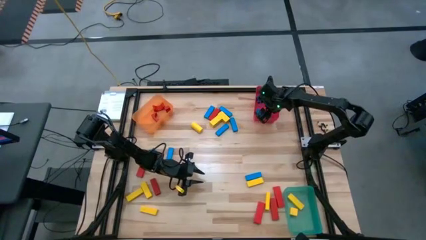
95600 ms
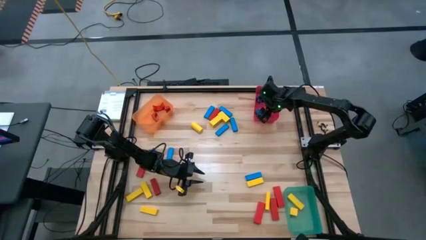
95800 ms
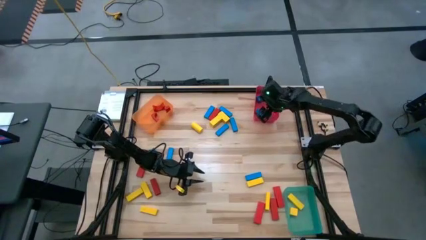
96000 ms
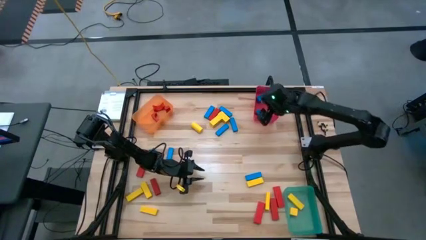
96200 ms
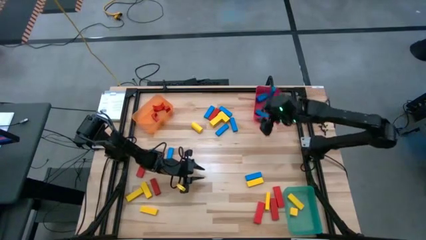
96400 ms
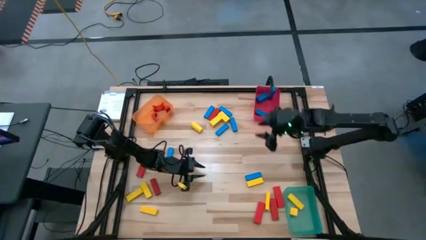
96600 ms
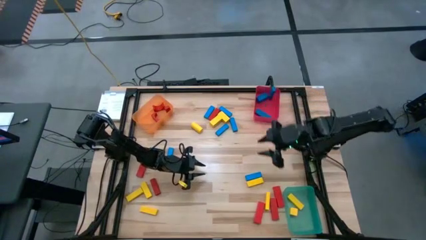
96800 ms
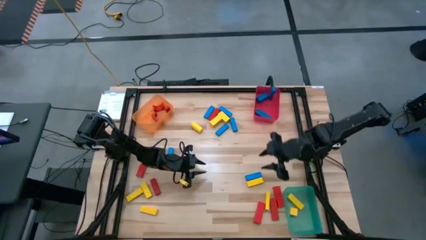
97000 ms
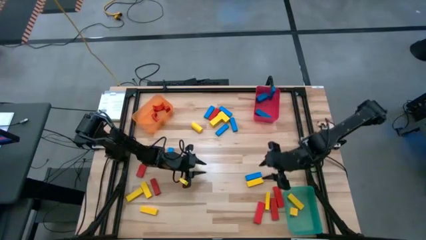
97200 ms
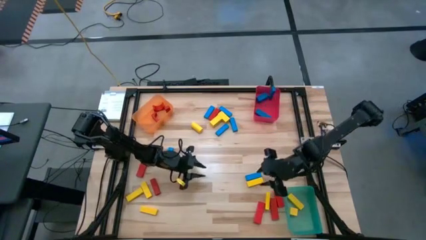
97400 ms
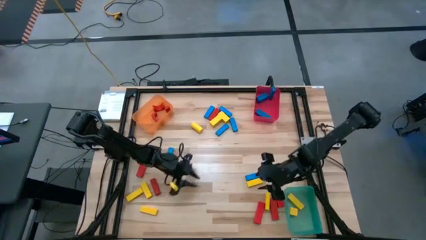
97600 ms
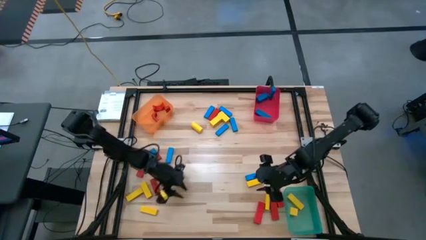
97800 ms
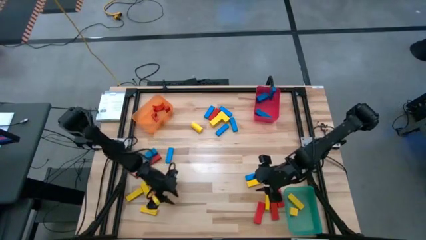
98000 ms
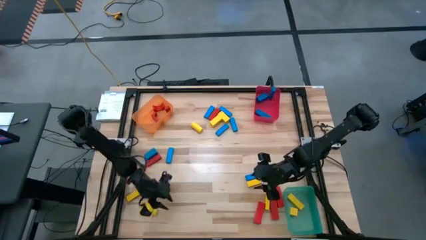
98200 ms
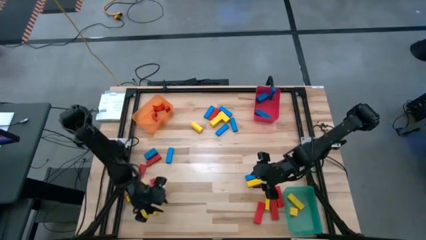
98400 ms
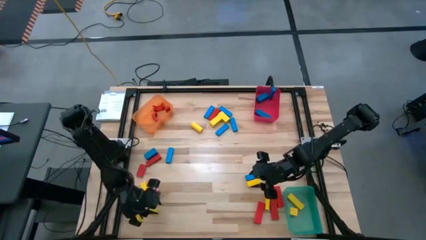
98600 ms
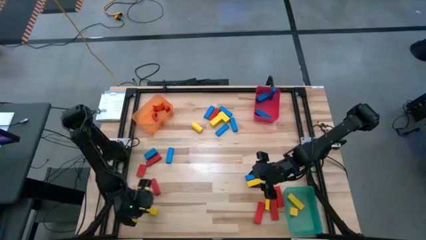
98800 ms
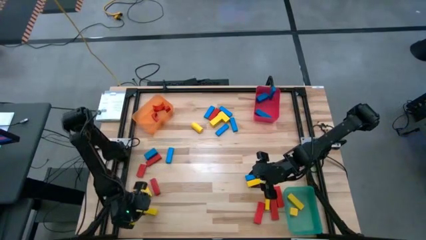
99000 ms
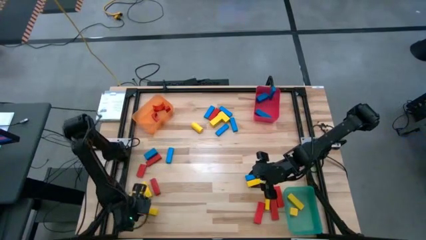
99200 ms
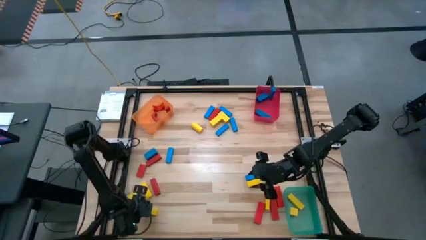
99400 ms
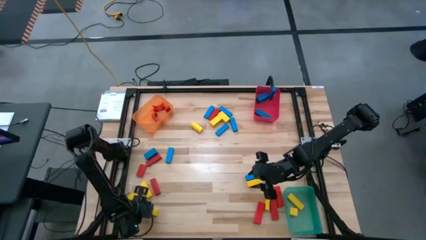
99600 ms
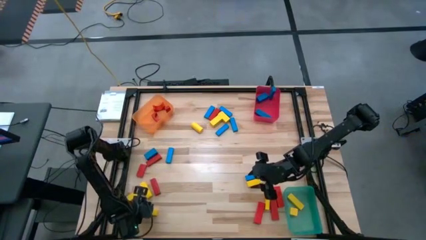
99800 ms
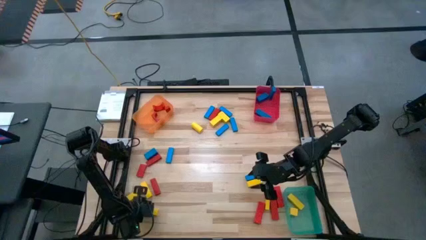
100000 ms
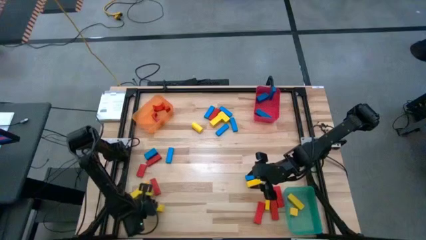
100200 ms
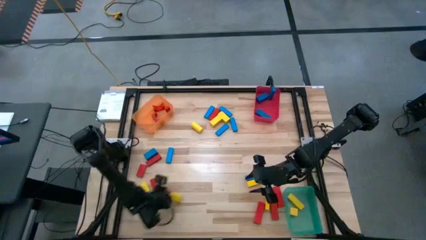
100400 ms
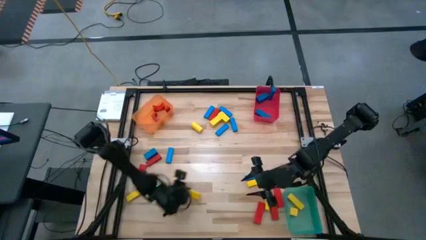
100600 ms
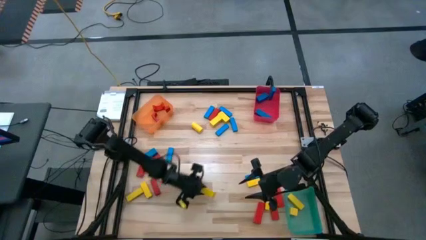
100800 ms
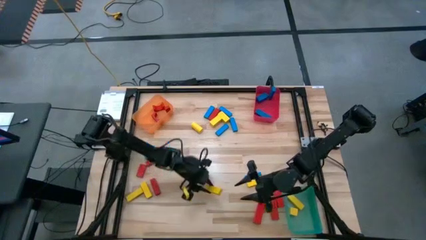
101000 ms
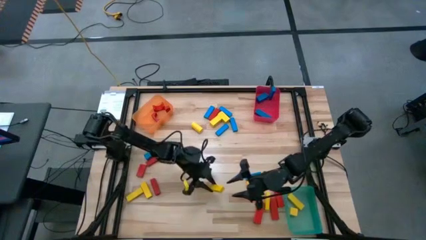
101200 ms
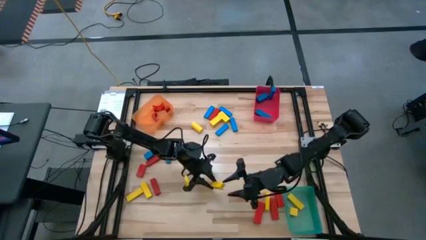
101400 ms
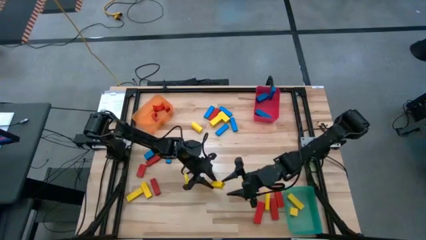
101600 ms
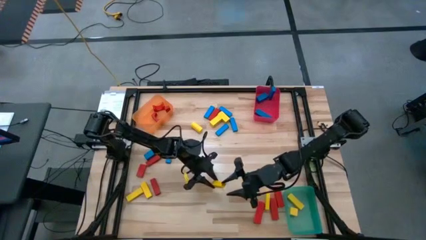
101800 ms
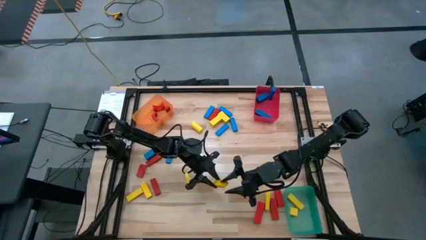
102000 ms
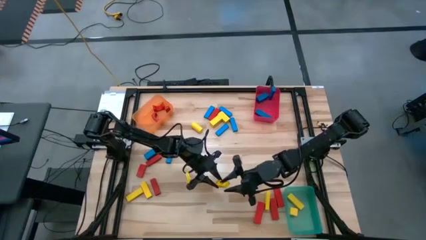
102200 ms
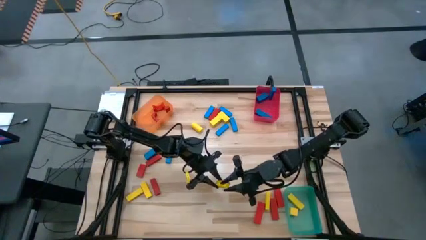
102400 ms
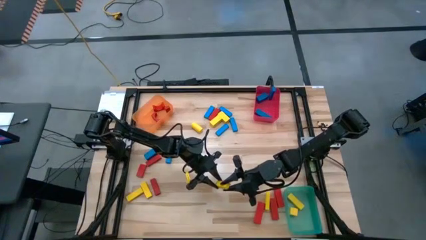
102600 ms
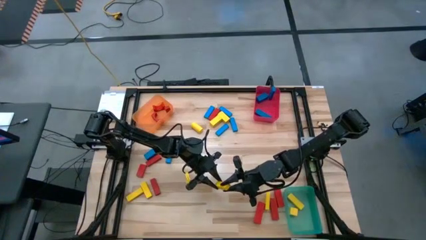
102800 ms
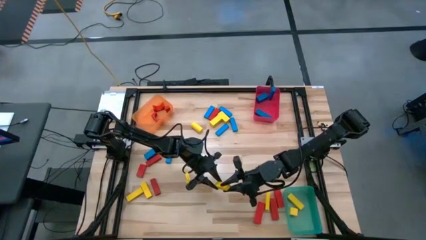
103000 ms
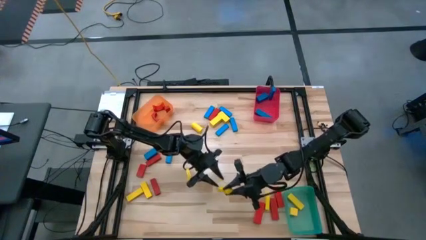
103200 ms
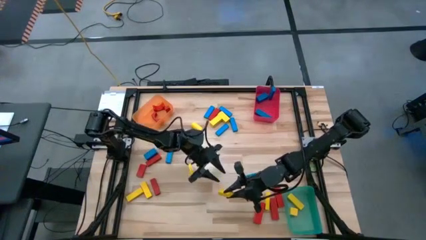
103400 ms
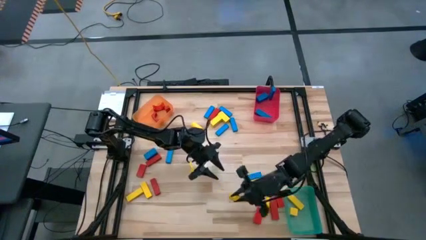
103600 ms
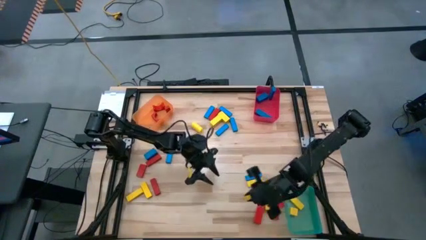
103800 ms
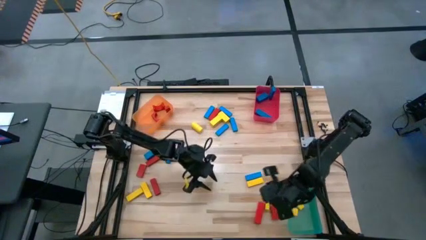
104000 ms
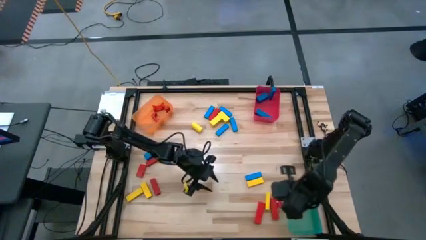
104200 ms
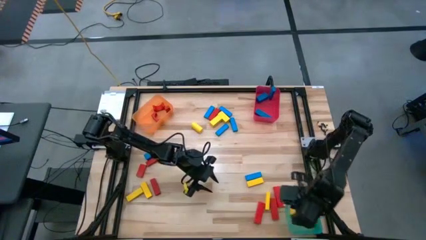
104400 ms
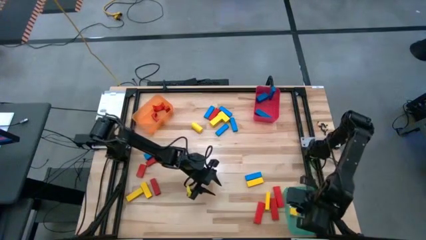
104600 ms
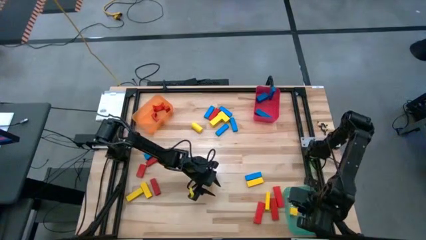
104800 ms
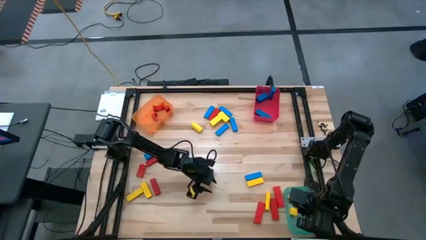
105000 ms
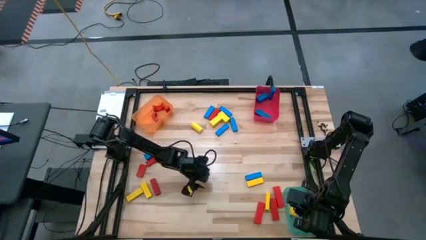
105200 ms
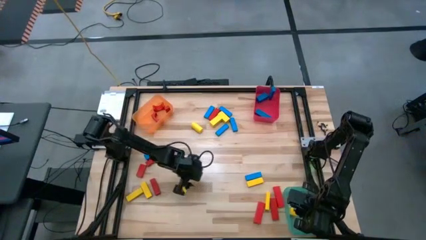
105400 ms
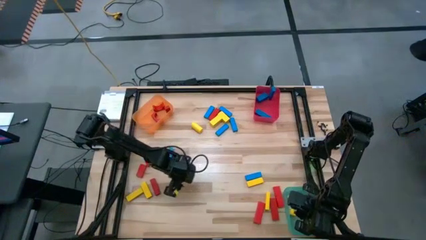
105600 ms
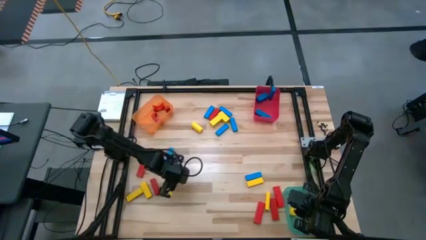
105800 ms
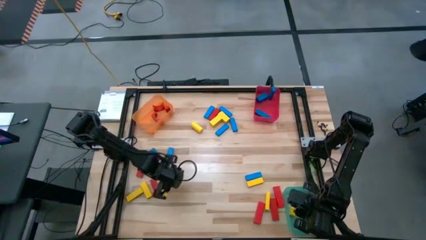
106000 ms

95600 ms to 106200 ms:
Task: Sort blocks
Put the yellow block into the green bin

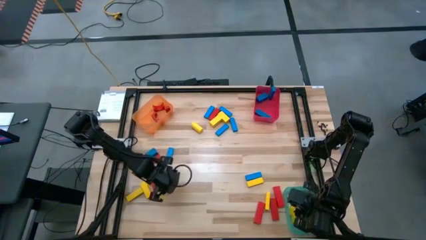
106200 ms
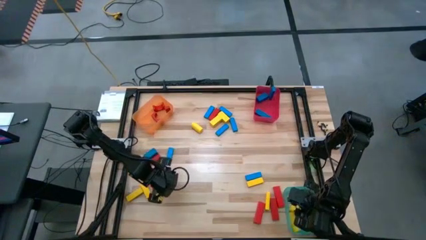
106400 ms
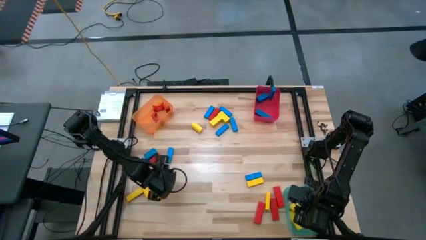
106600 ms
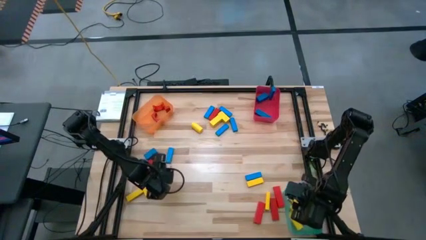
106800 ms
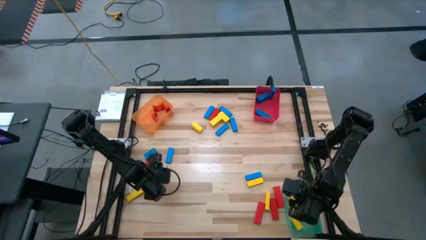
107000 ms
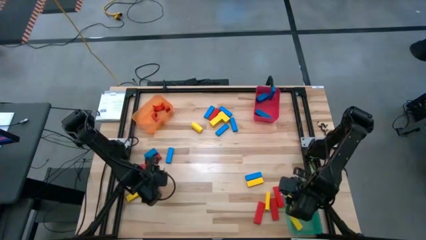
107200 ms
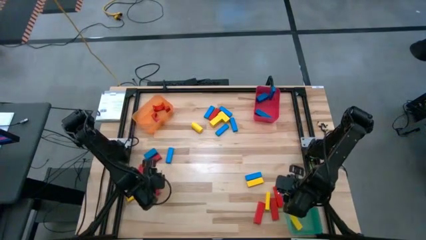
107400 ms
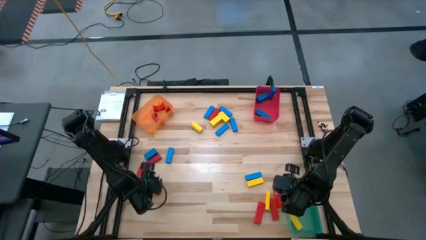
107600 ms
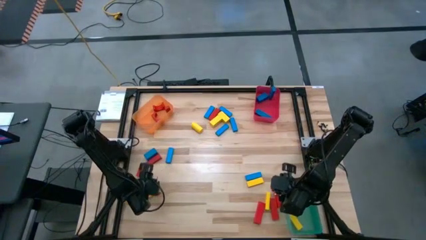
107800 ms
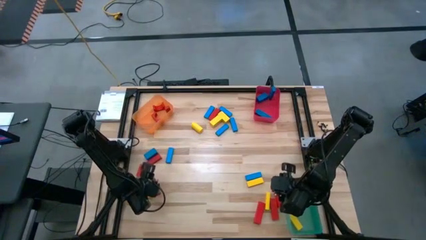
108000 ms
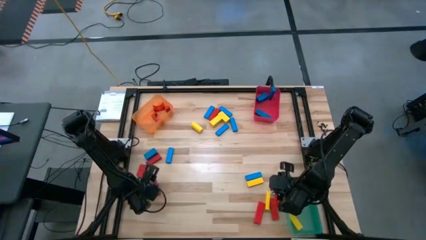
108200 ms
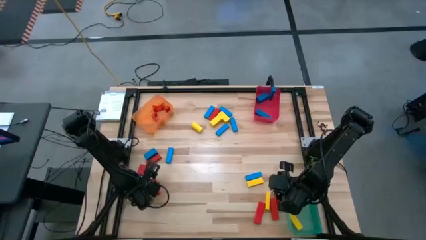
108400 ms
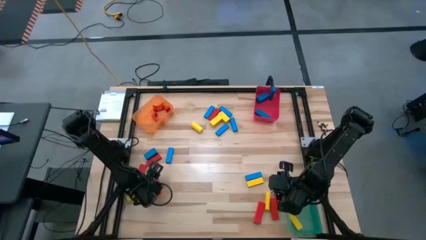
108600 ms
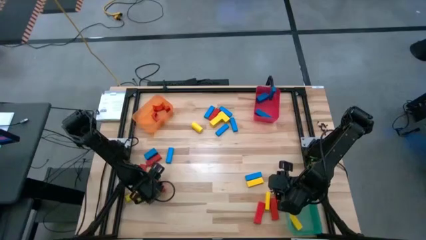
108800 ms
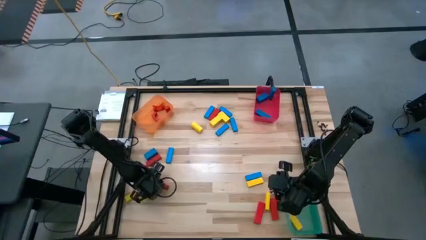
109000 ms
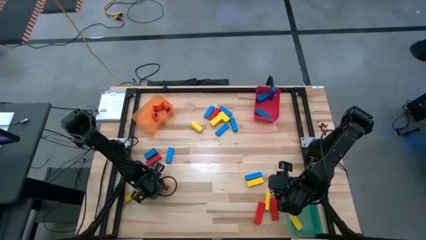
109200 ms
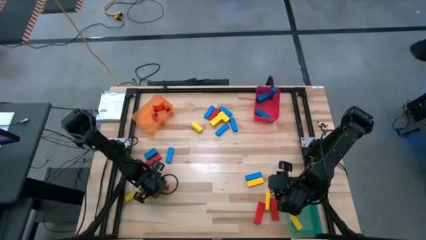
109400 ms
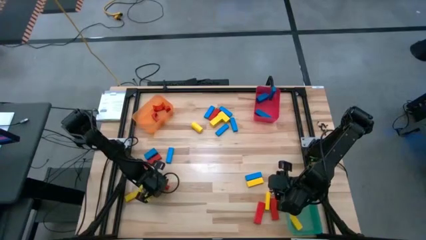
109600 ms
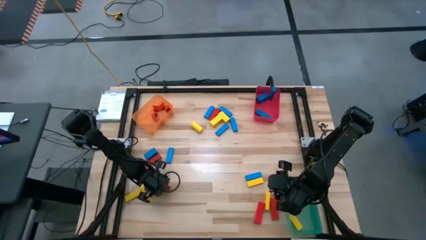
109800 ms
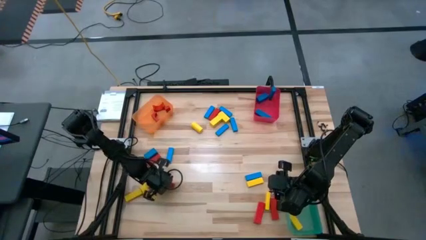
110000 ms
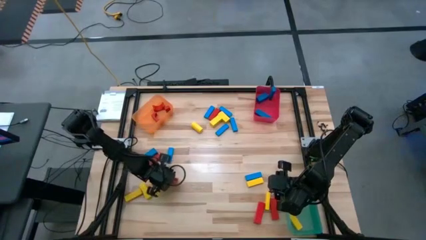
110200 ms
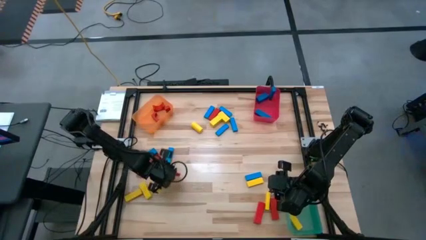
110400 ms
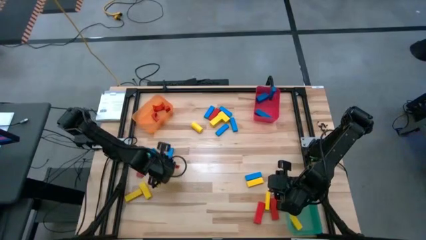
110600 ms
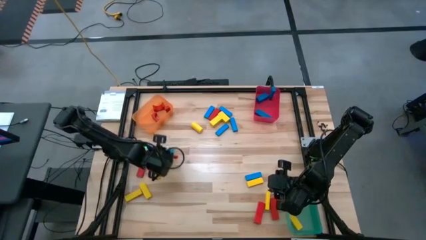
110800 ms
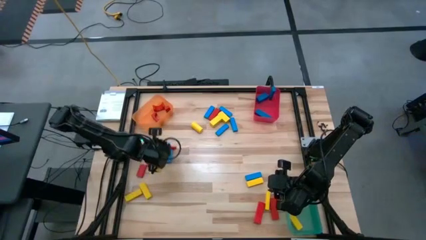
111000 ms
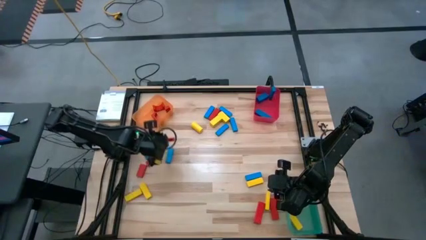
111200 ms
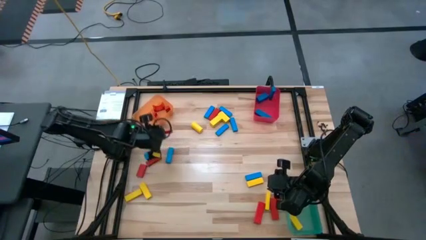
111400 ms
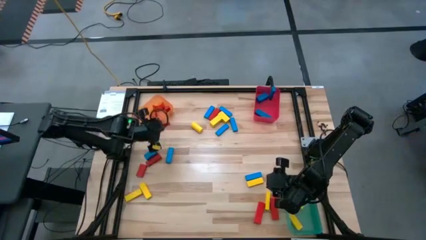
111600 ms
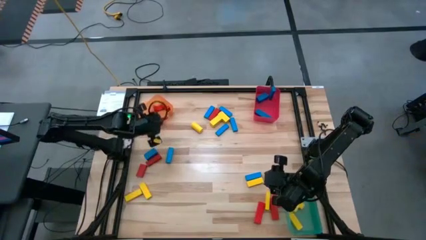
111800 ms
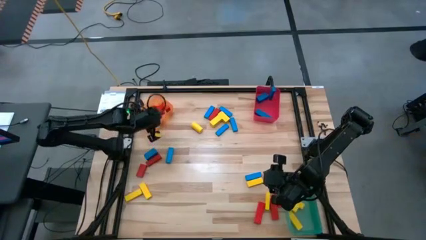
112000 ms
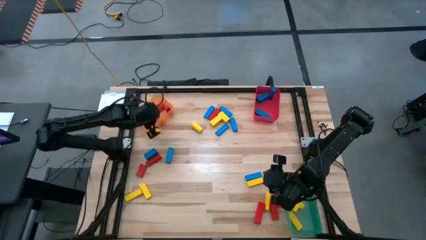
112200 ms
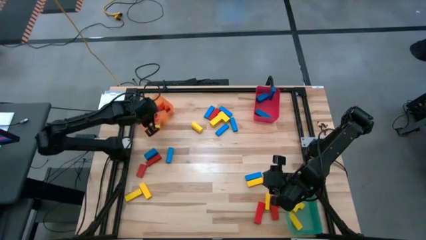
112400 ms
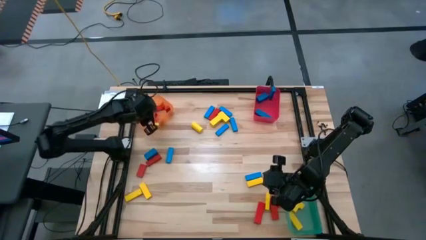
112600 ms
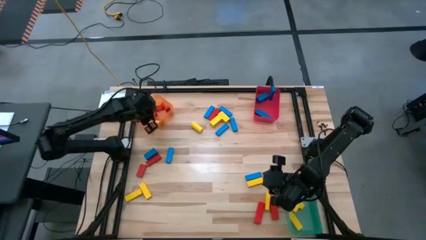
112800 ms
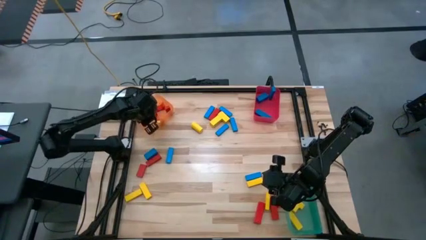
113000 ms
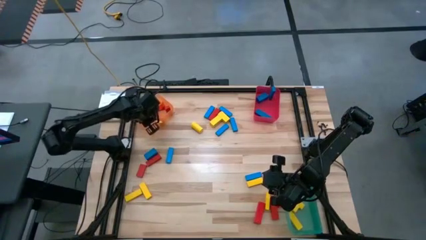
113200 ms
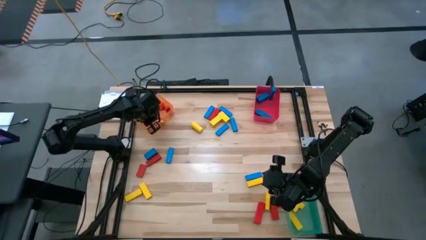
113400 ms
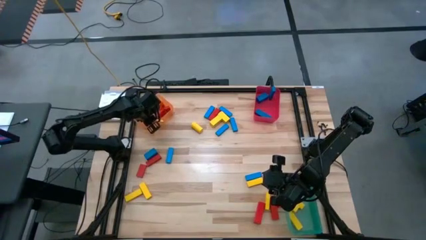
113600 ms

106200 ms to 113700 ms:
Put the red block into the orange bin
